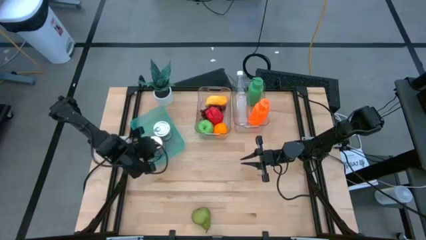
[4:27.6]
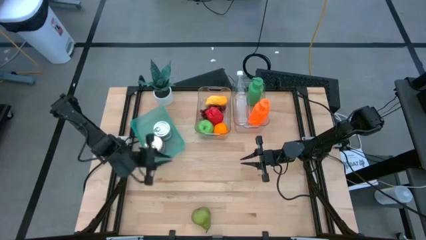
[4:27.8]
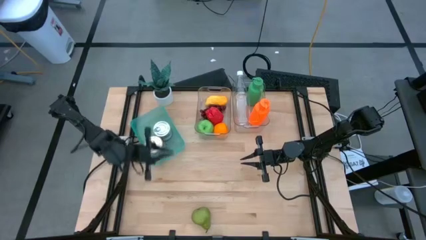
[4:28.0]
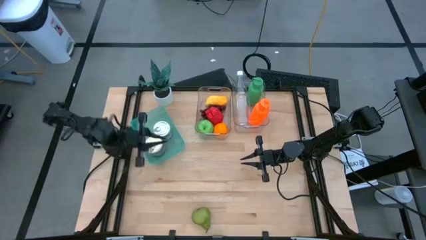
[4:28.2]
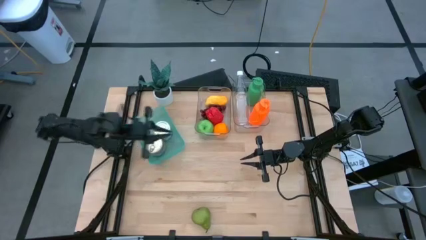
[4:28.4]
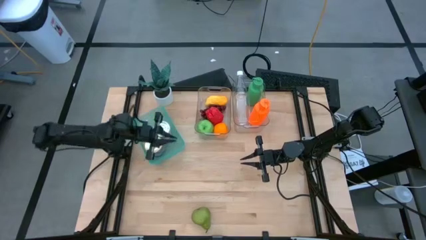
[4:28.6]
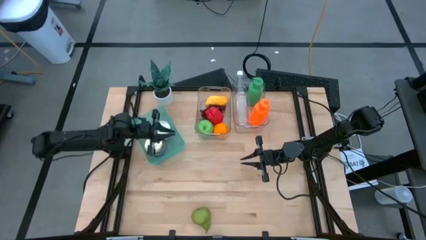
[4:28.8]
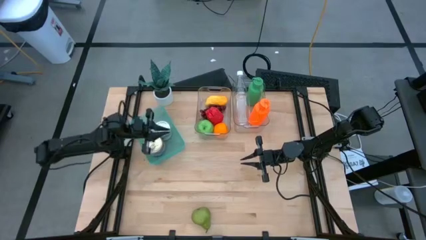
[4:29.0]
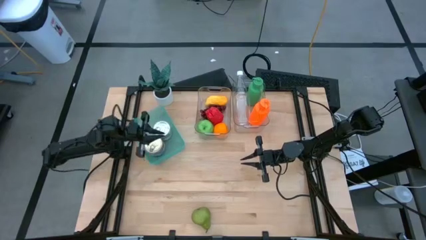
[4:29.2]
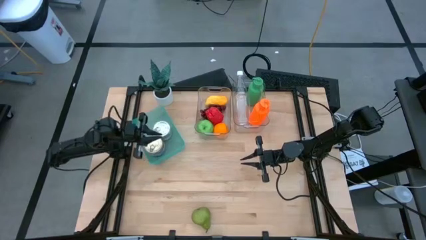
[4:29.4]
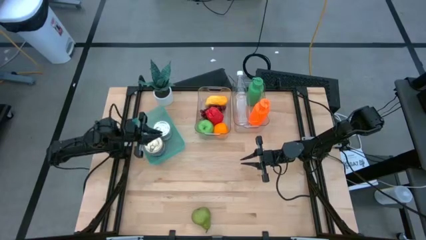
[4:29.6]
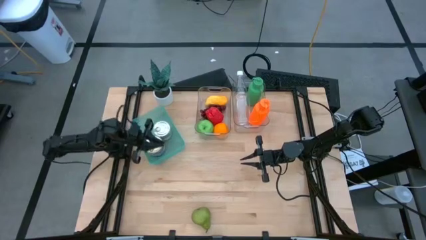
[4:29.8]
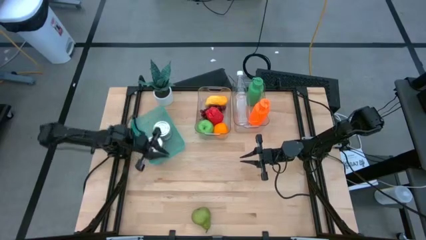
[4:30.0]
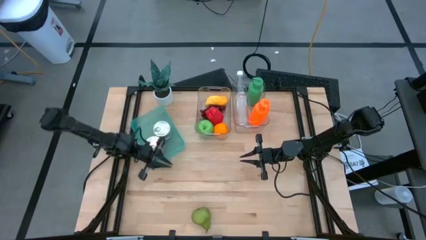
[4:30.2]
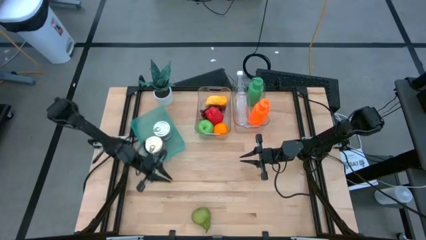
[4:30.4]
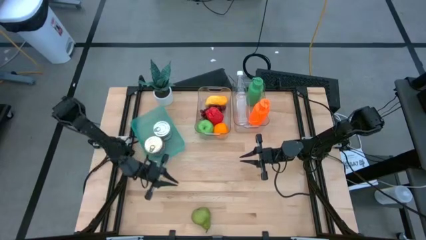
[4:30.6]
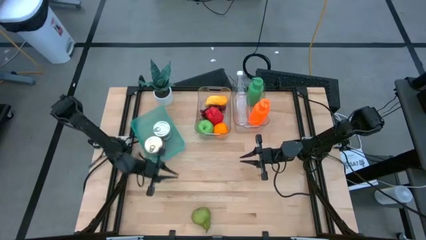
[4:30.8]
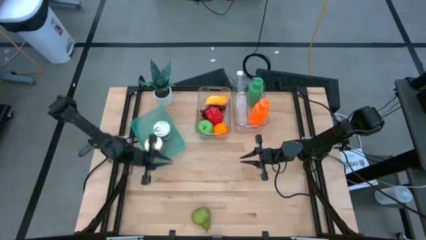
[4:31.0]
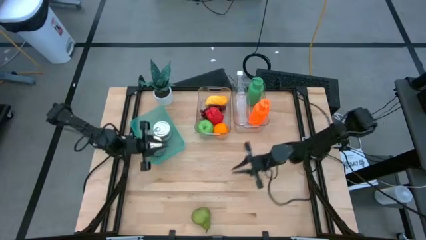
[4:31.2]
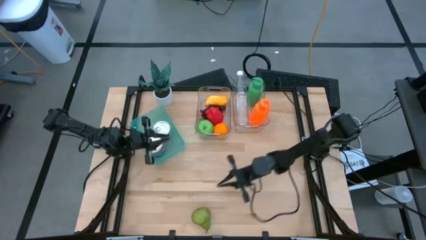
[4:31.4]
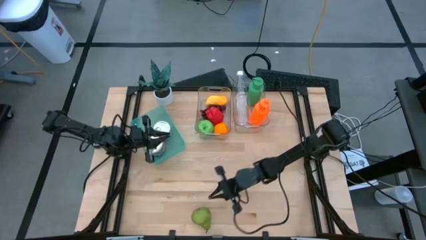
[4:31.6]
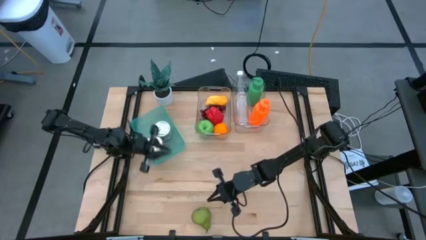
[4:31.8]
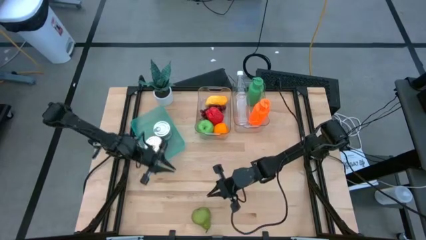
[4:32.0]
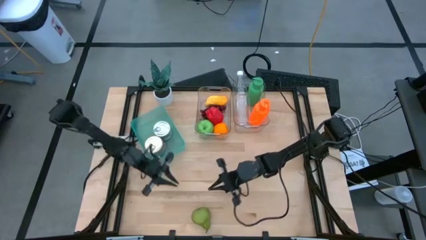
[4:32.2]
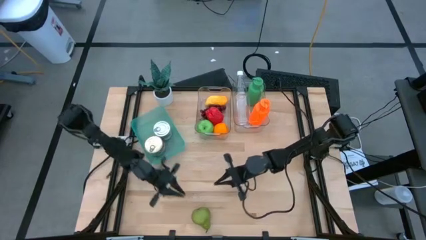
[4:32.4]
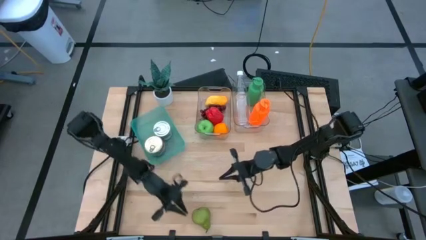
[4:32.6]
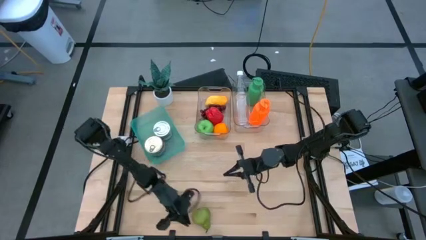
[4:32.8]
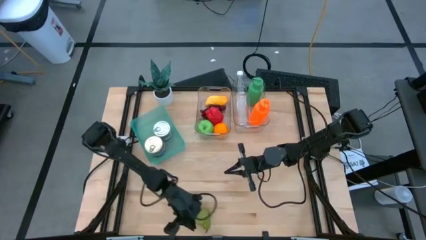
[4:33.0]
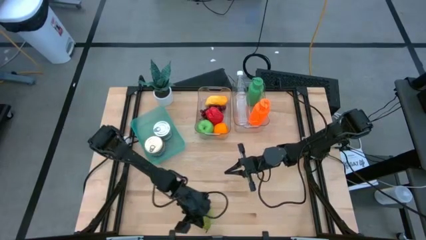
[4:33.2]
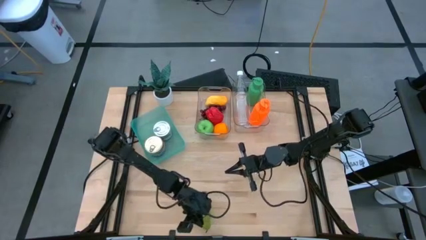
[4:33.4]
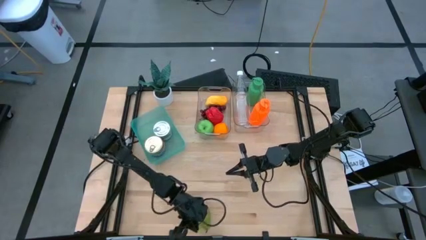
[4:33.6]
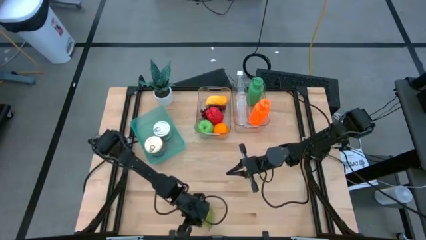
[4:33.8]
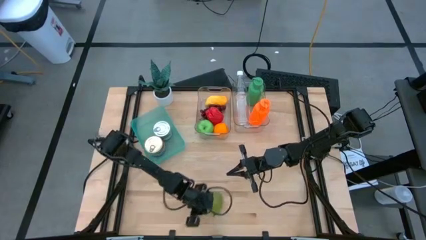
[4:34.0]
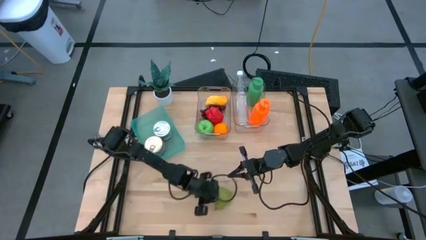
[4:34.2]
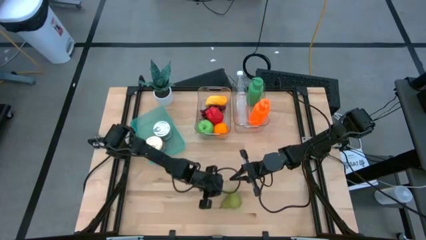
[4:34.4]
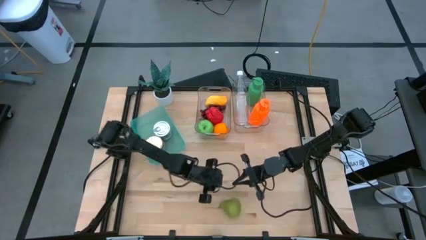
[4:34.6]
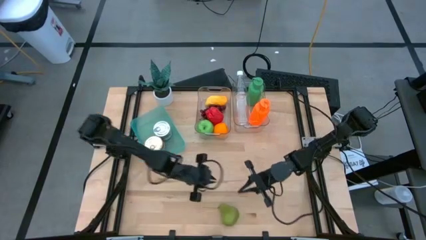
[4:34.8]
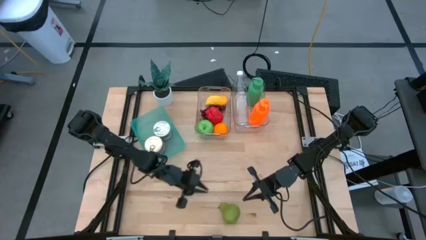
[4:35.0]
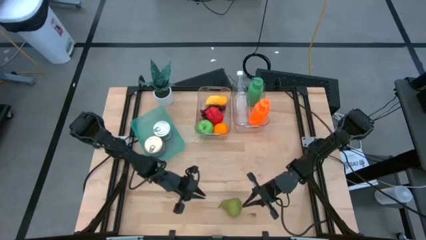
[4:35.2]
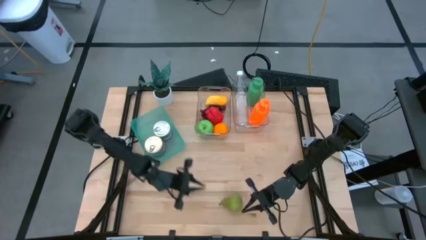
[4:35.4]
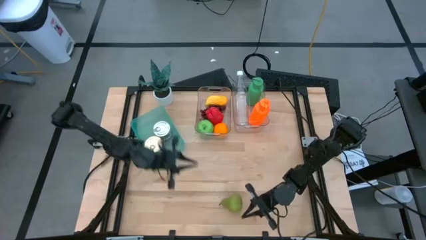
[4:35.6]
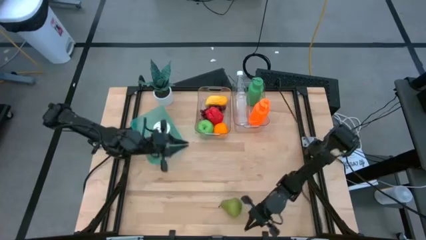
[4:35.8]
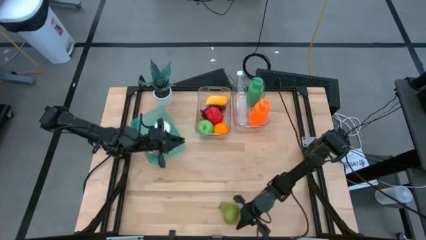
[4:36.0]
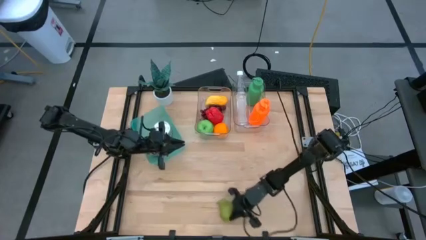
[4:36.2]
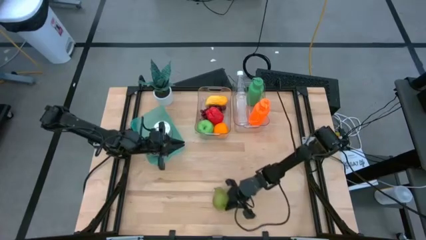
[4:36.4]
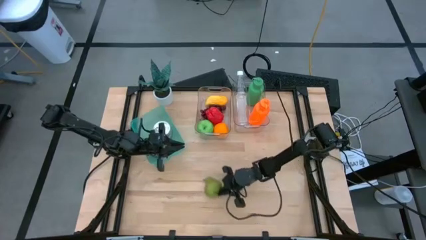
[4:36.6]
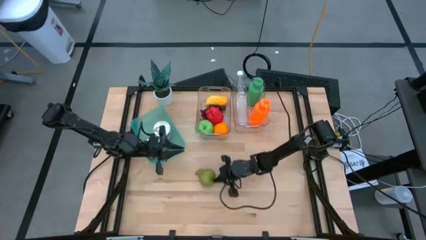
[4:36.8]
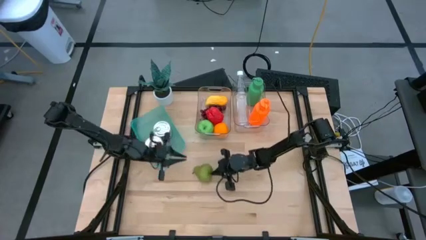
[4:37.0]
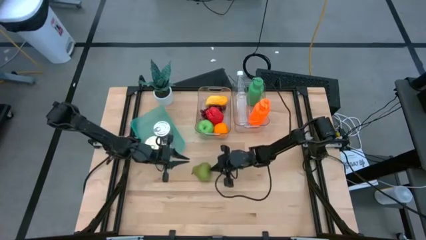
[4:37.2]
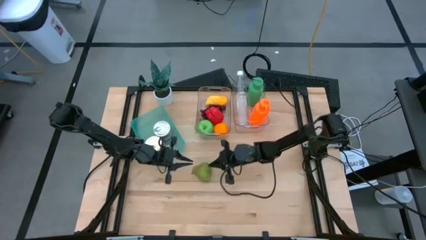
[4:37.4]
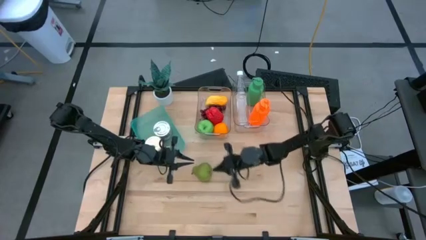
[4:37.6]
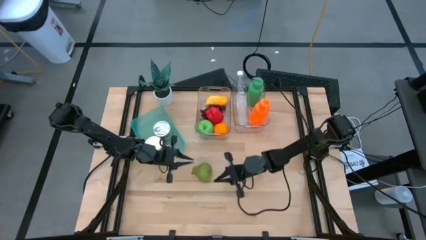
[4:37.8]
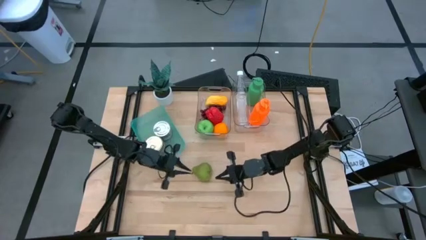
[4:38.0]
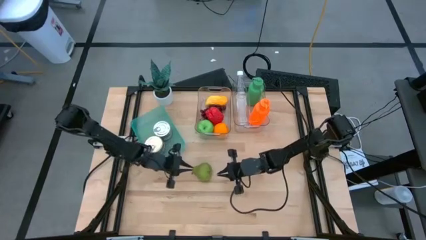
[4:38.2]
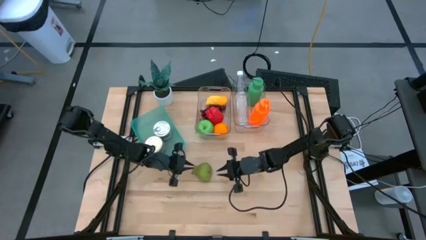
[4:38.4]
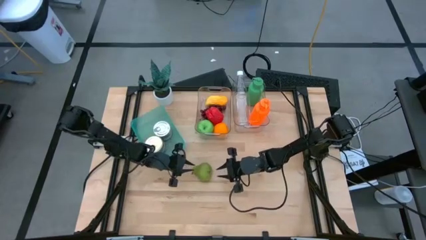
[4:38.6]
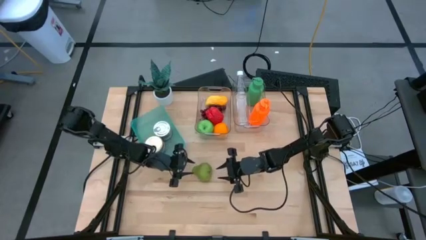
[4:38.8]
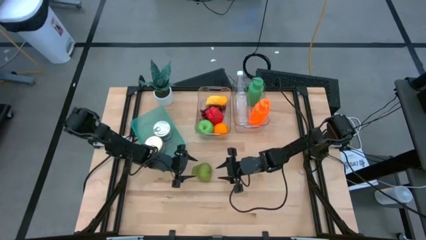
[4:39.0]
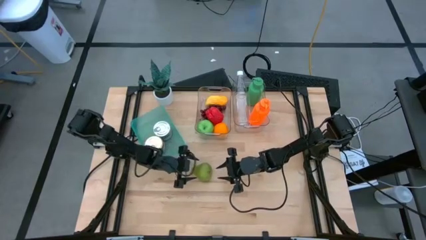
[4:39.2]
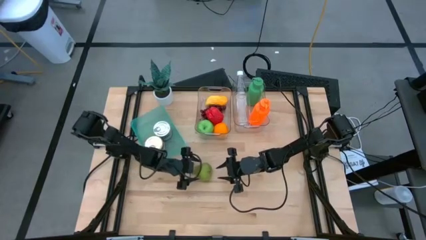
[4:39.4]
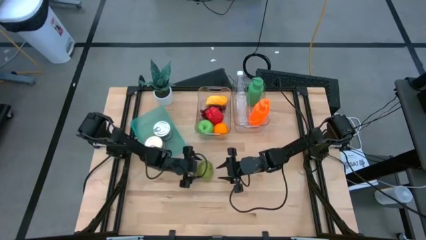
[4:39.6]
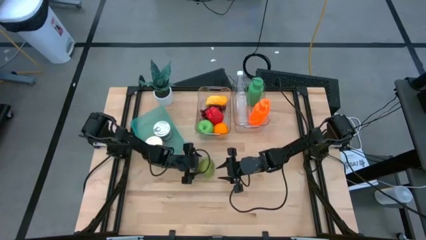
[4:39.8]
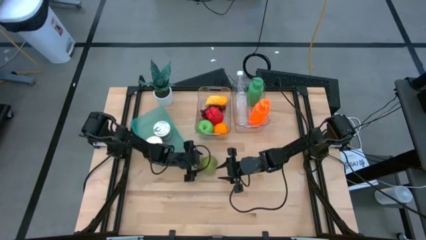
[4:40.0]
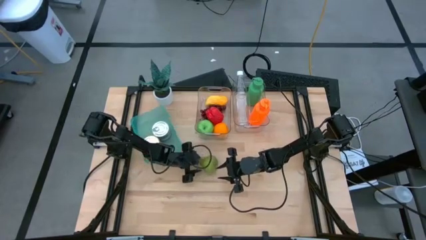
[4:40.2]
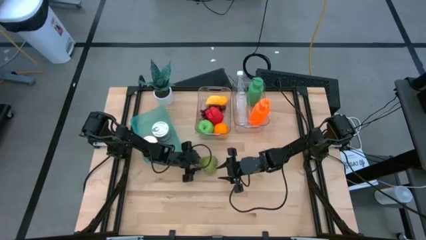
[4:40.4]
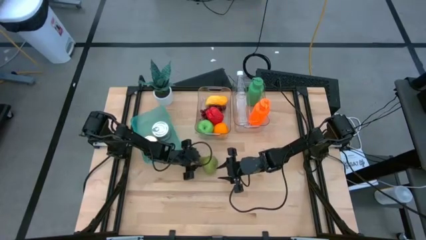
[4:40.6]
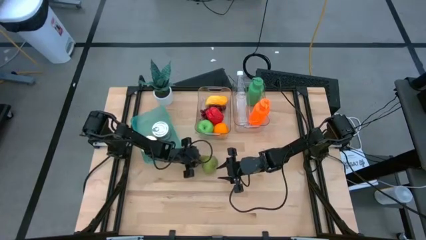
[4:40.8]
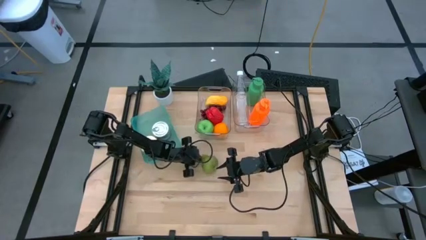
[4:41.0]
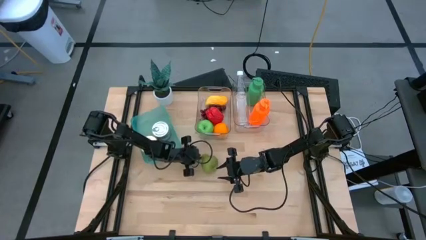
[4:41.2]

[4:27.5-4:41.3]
Task: Pick & Place Food Item
Put the pear into the left transparent bin

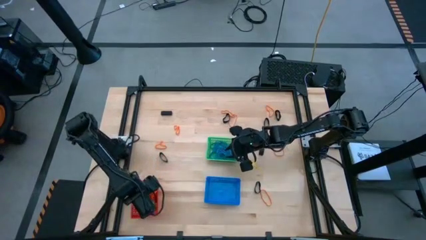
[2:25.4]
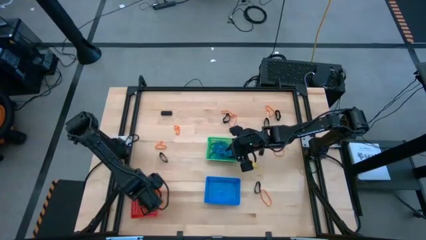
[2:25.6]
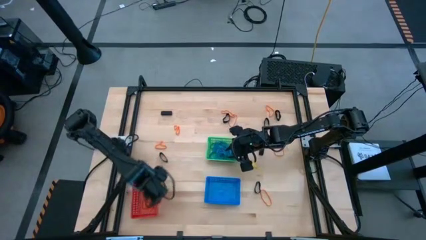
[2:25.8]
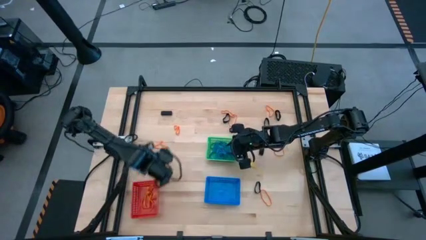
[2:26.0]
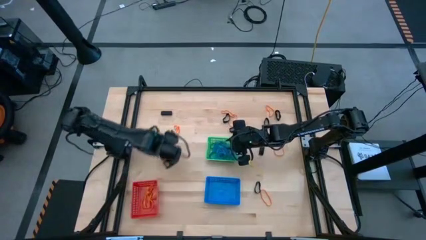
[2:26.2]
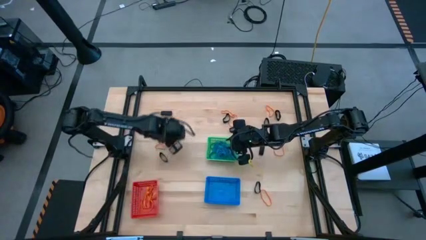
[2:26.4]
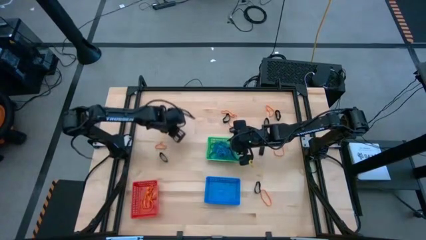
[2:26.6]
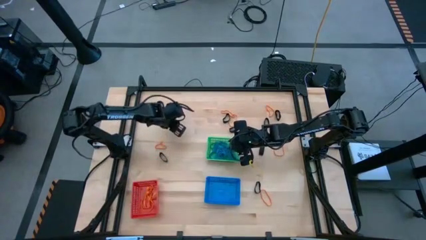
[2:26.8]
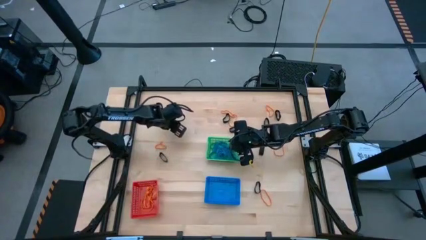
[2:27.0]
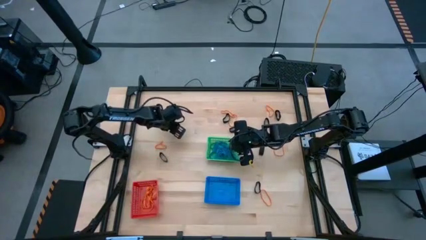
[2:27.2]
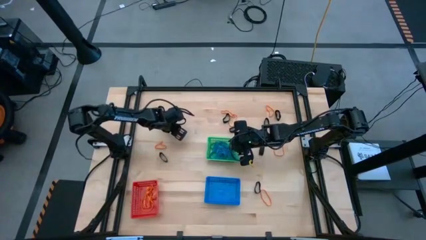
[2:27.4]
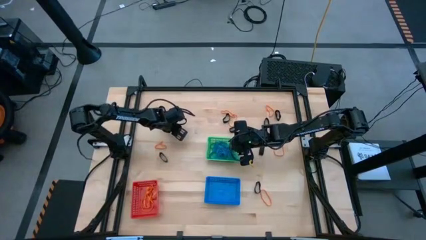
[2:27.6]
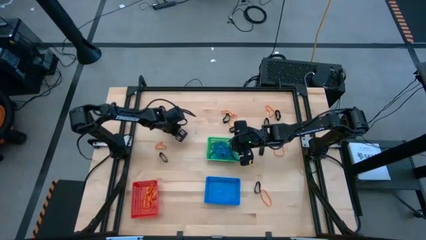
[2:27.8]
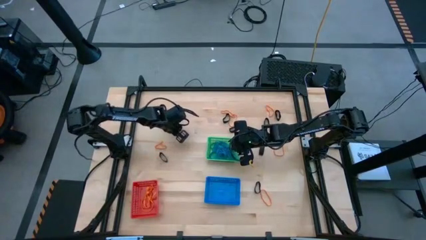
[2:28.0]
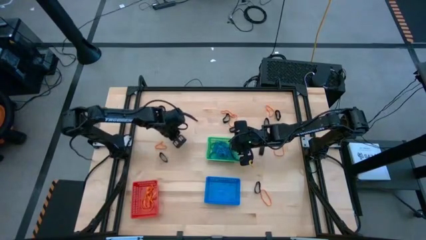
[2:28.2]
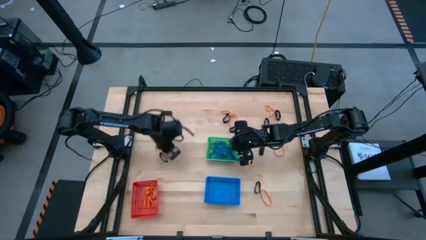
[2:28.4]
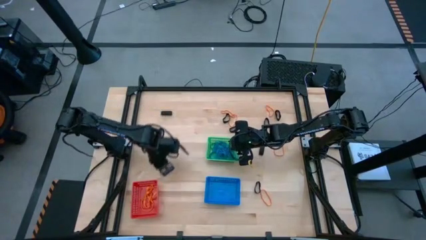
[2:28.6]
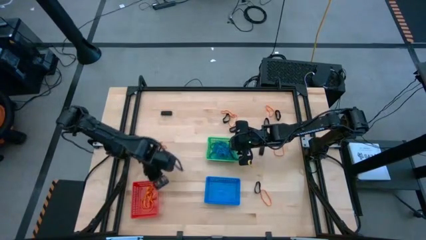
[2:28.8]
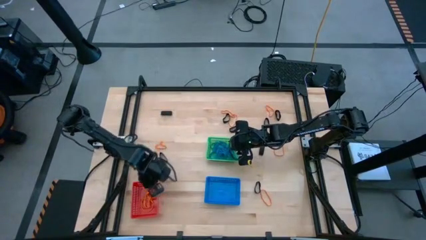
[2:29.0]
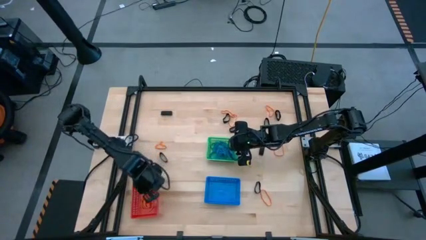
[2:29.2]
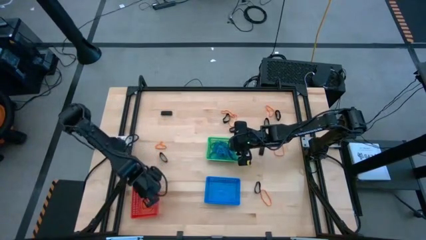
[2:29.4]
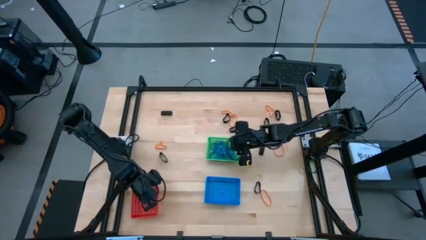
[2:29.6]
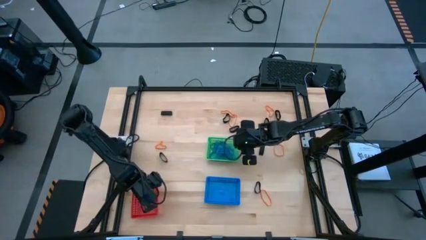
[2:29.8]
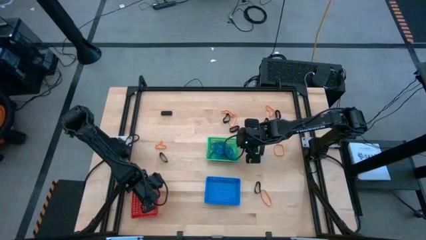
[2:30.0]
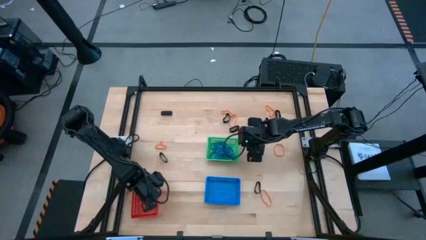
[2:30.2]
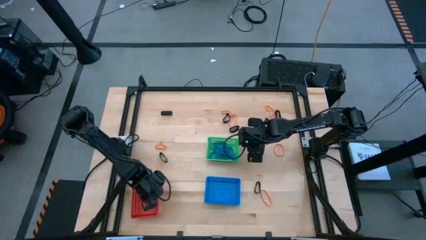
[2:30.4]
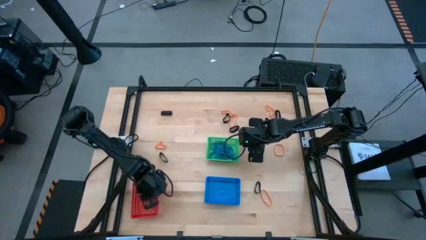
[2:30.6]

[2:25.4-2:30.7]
Task: Sort rubber bands into baskets
Put the orange rubberband into the red bin
